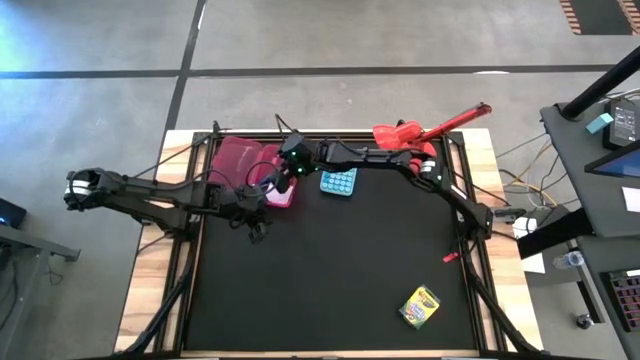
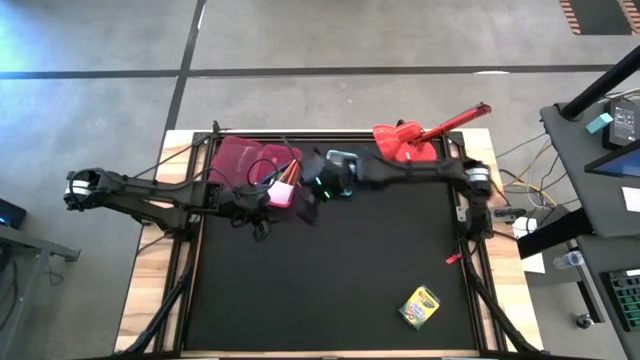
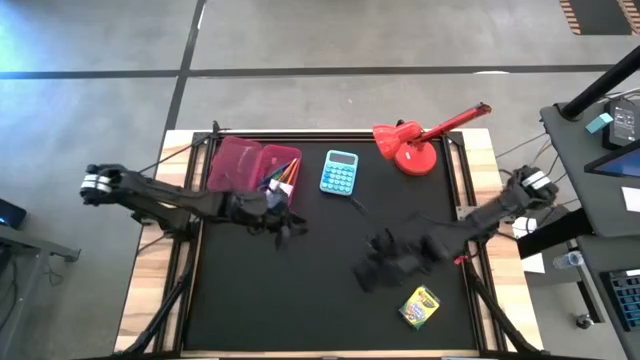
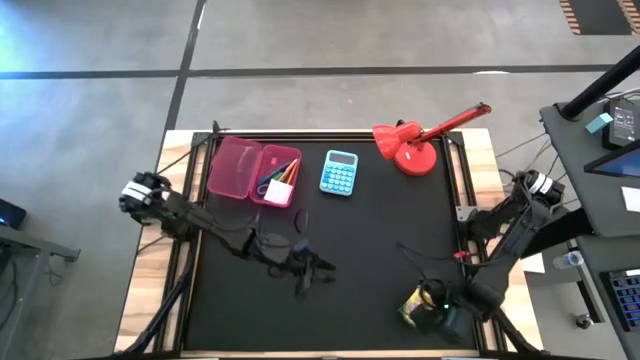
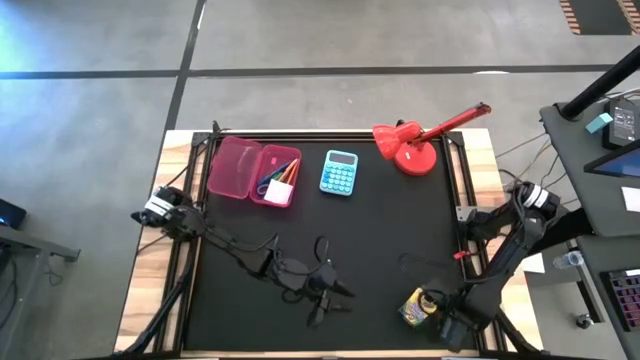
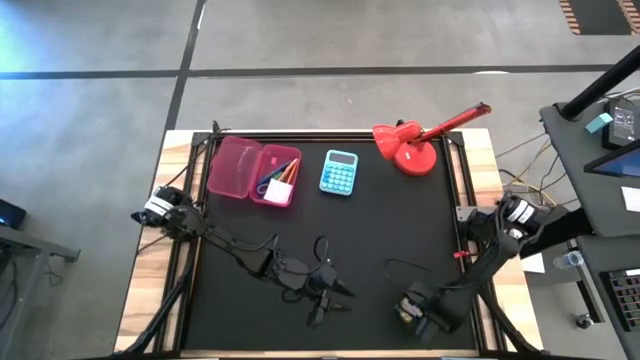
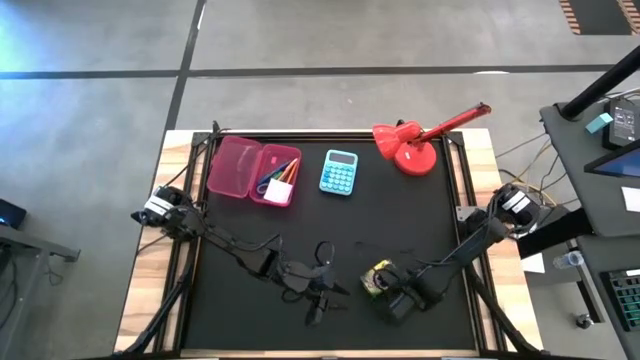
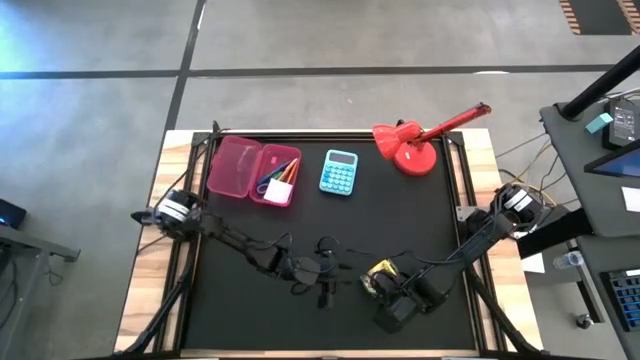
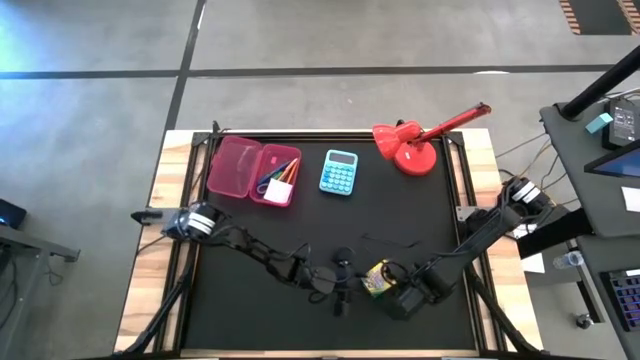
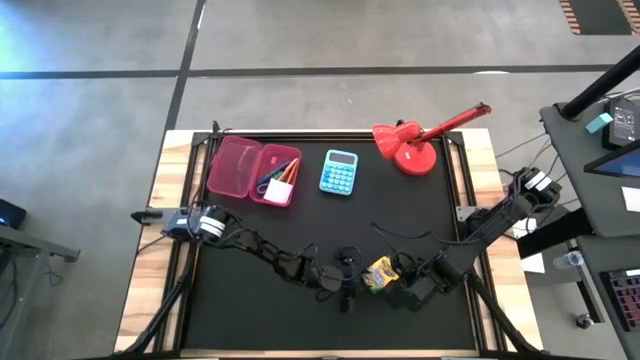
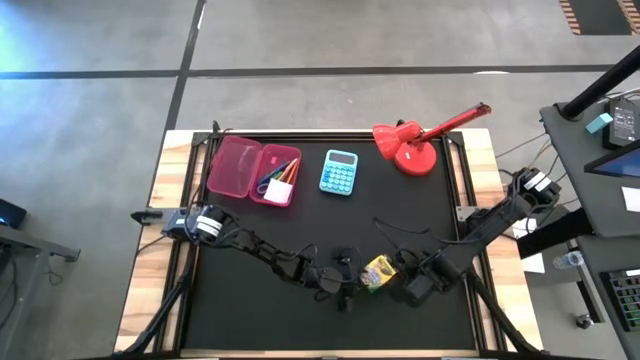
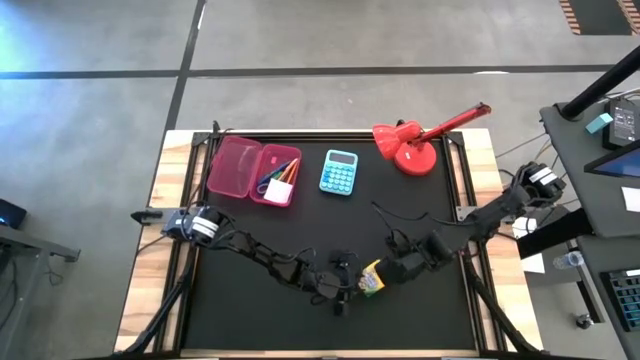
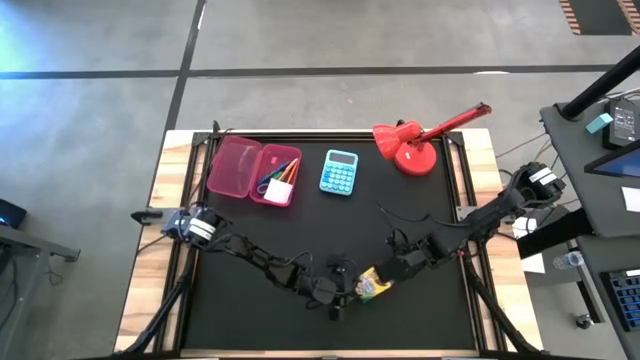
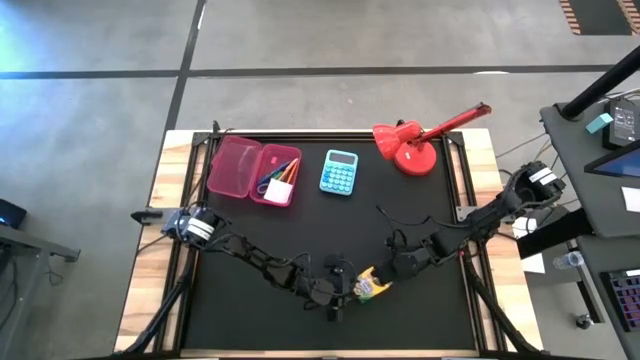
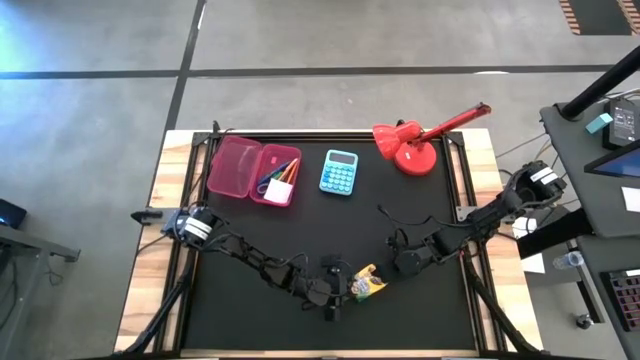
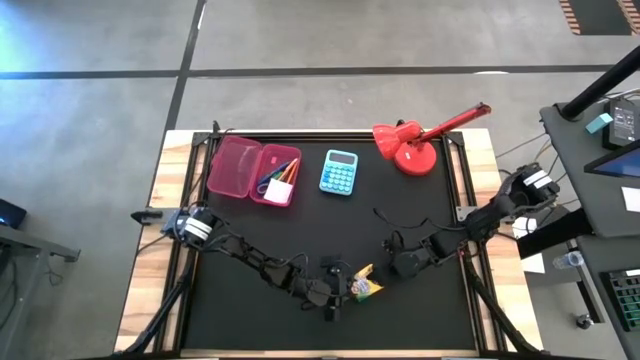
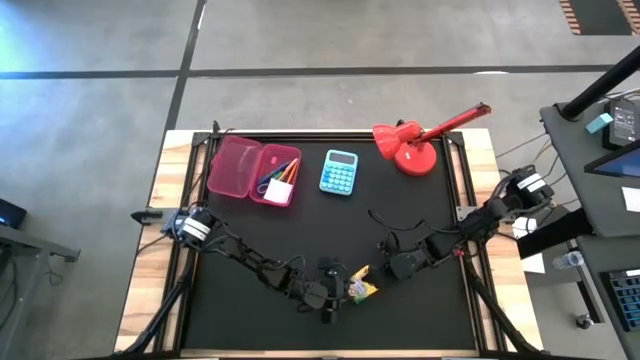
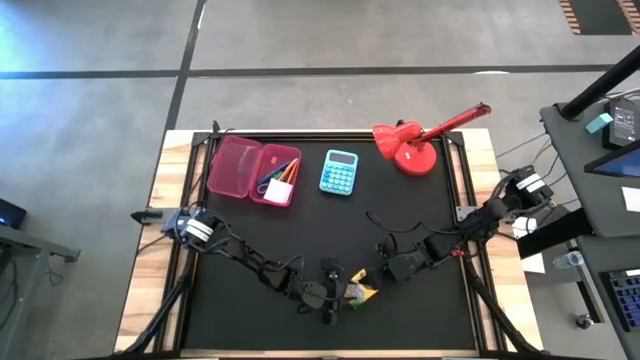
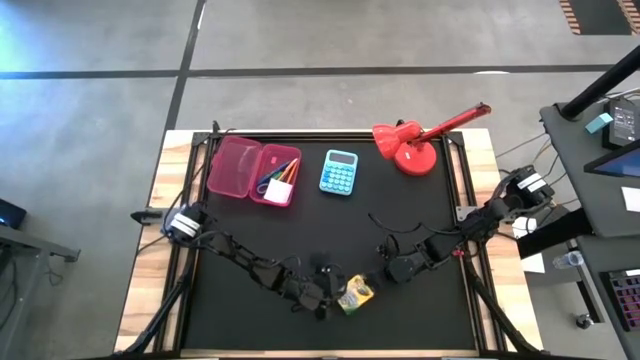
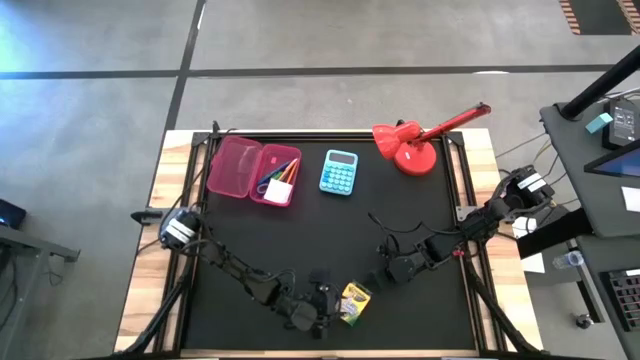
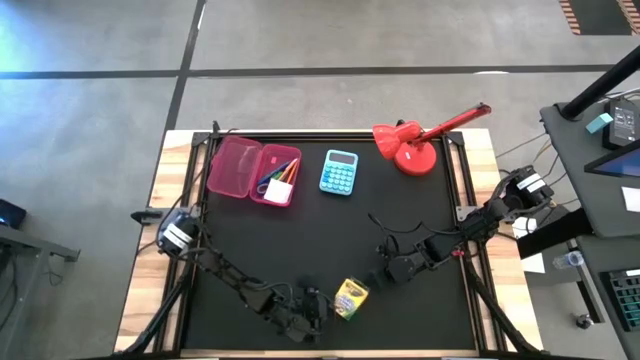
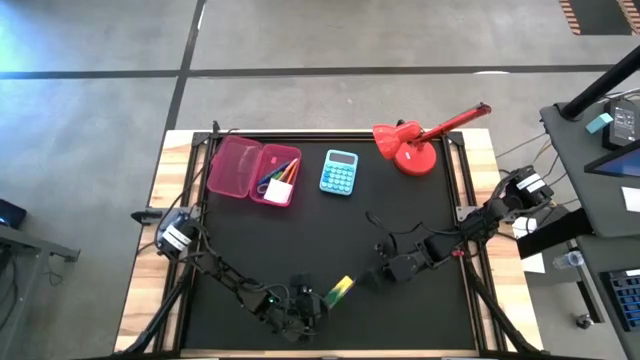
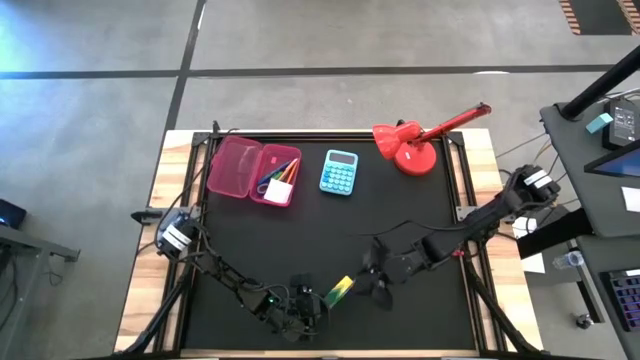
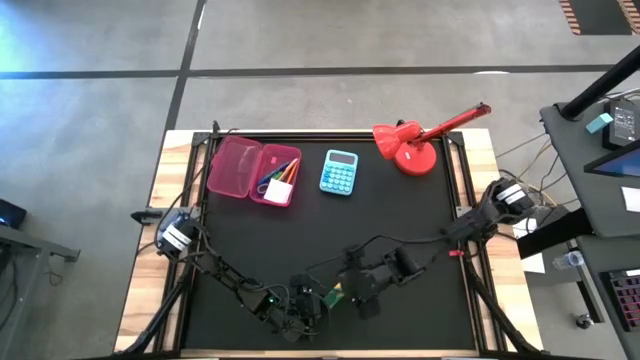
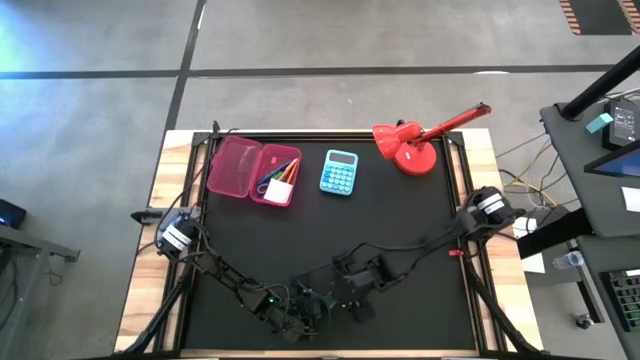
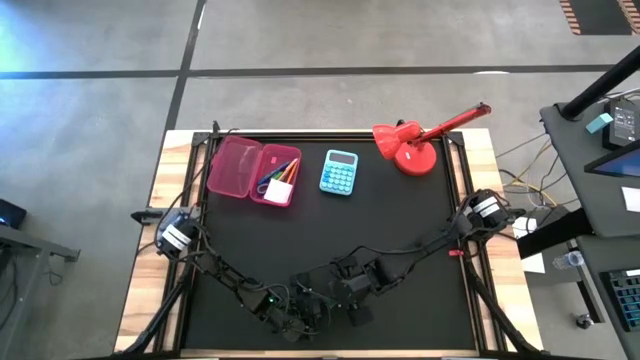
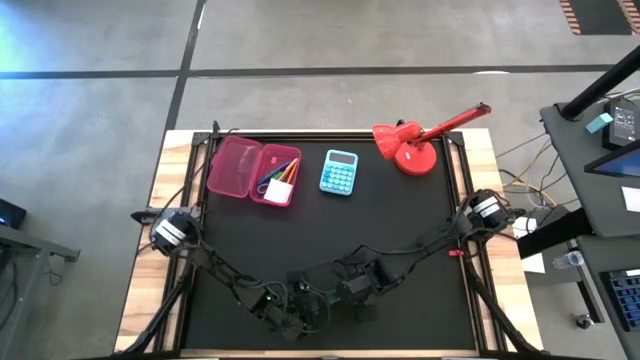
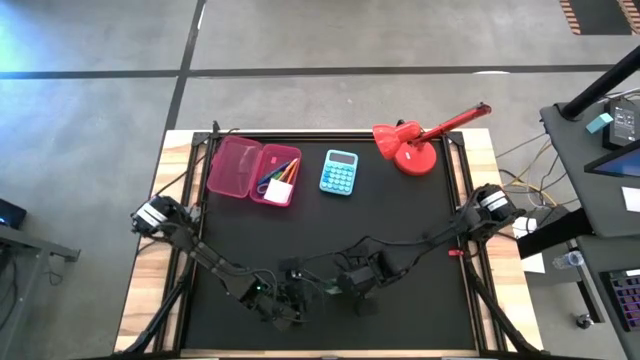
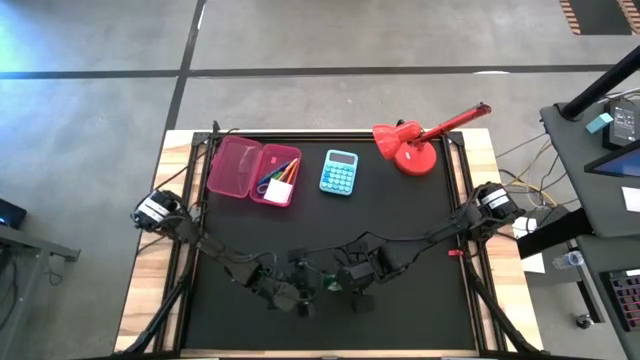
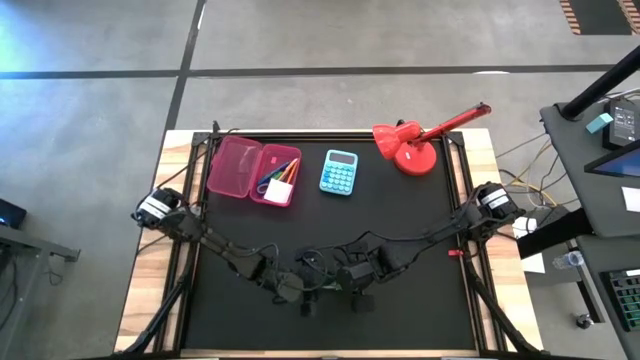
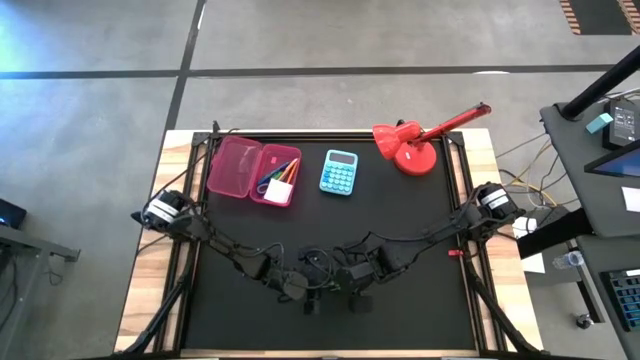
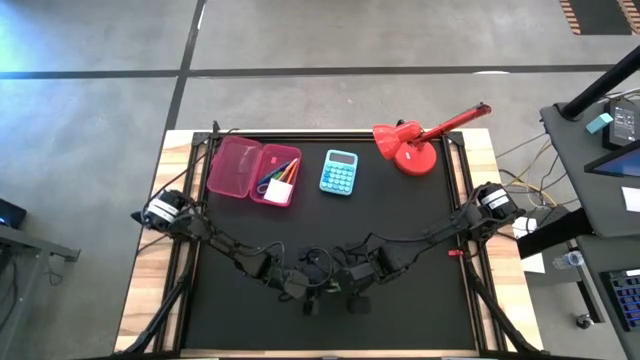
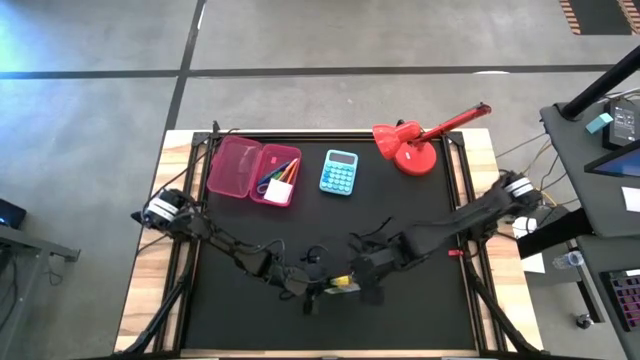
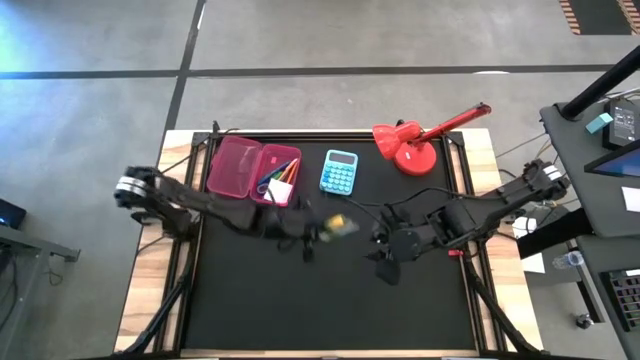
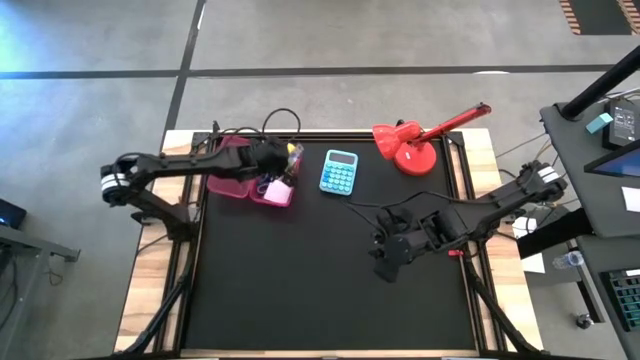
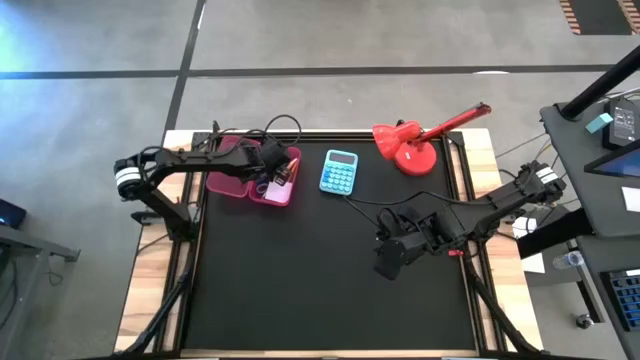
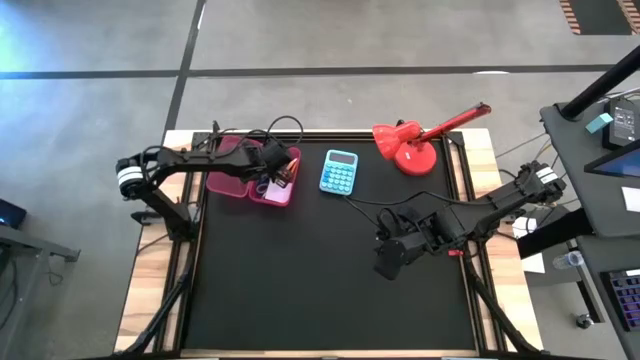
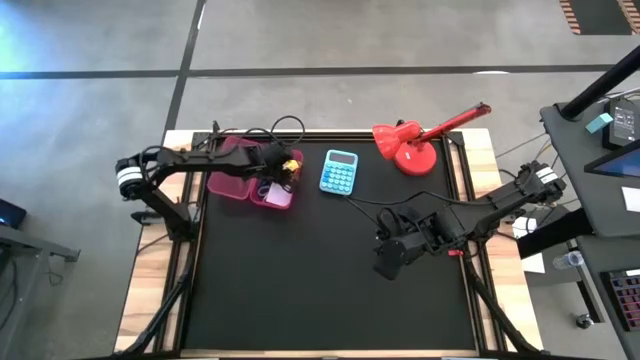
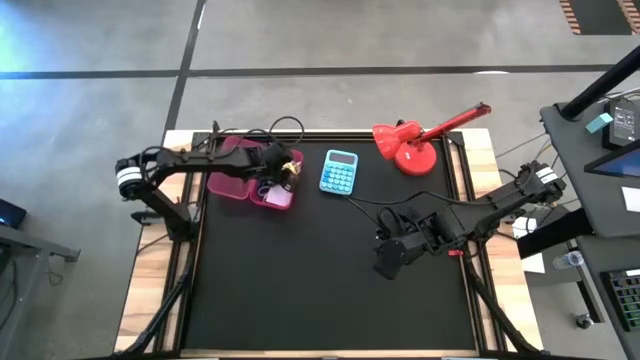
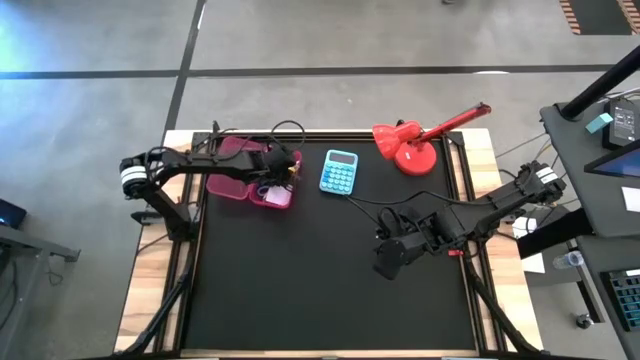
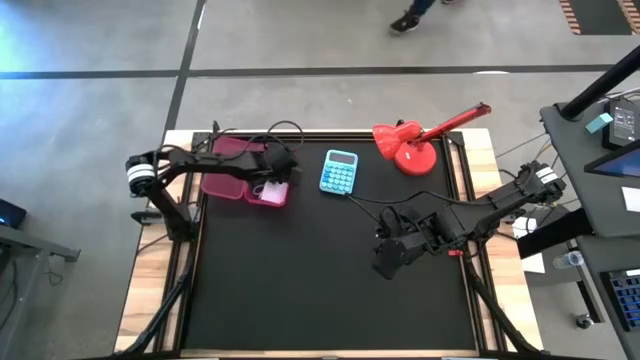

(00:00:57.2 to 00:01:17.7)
Task: Pack school essentials
Put the yellow crayon box into the pink supply box

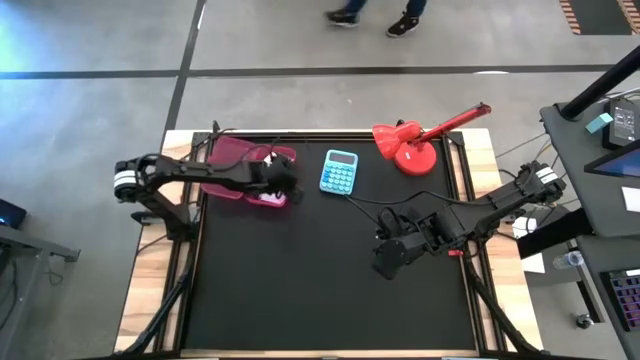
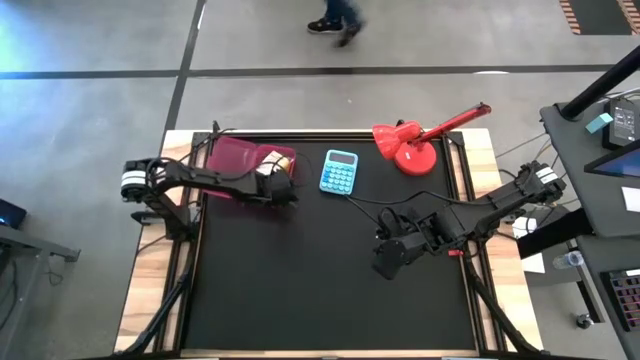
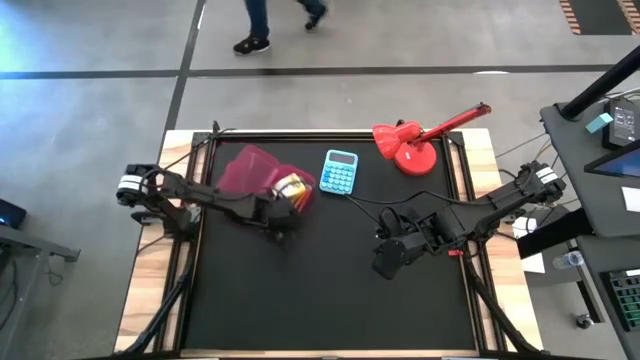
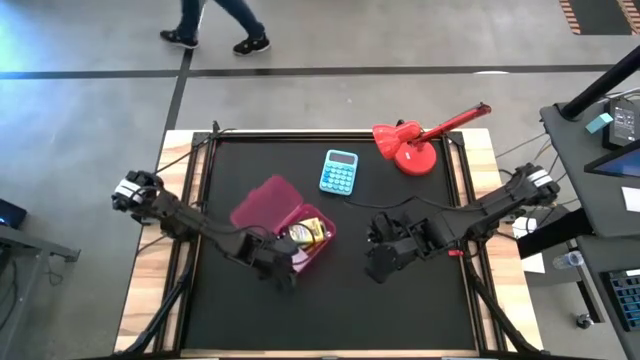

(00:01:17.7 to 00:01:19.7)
Move the pink supply box to the center of the table
